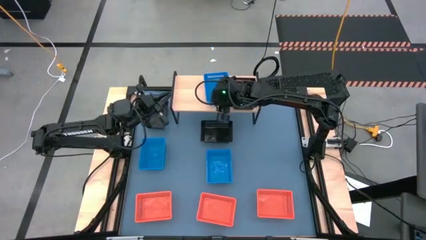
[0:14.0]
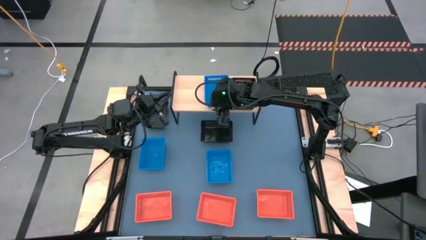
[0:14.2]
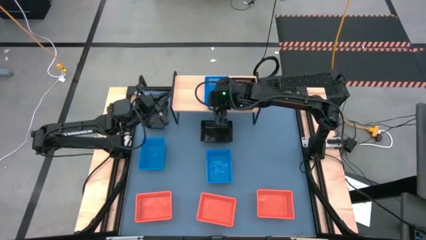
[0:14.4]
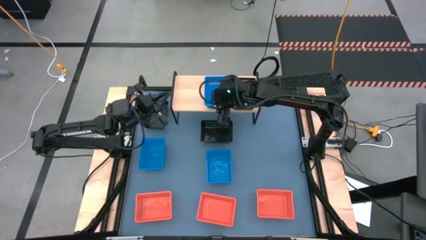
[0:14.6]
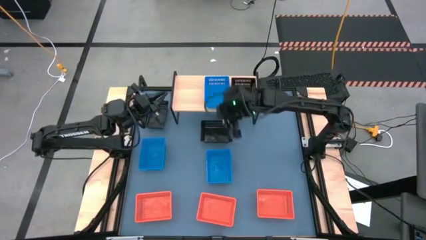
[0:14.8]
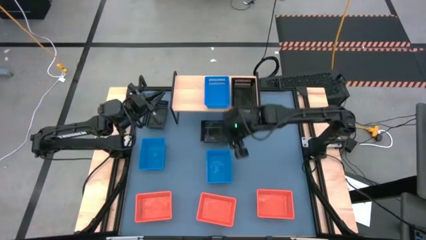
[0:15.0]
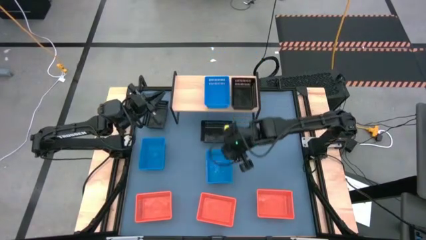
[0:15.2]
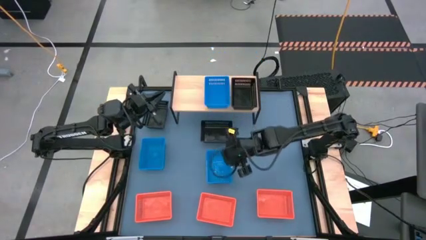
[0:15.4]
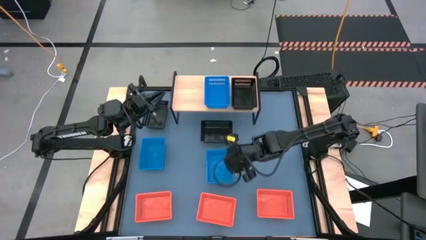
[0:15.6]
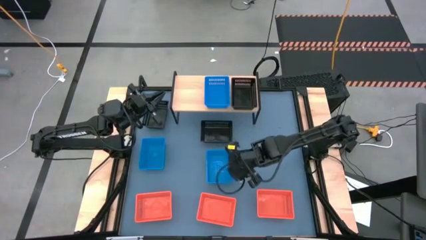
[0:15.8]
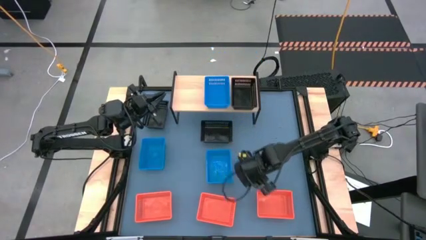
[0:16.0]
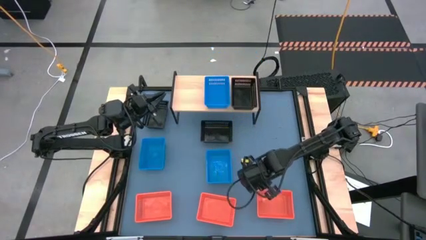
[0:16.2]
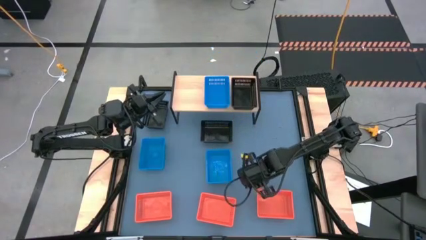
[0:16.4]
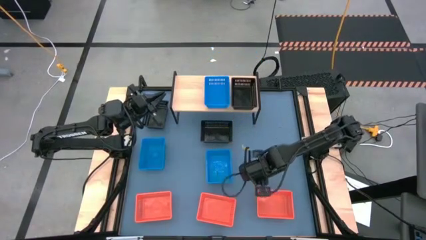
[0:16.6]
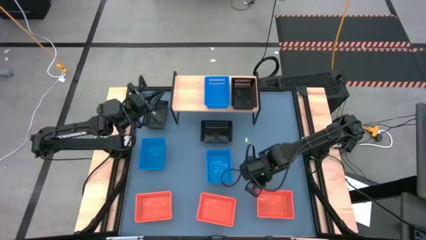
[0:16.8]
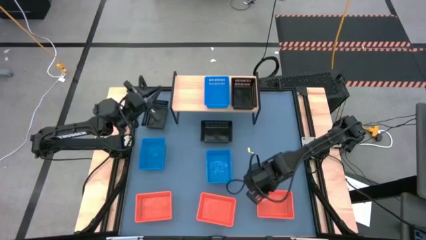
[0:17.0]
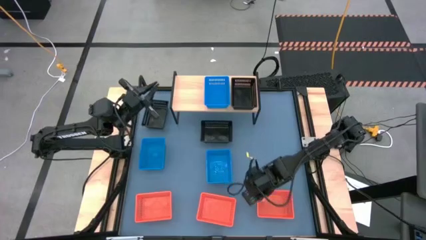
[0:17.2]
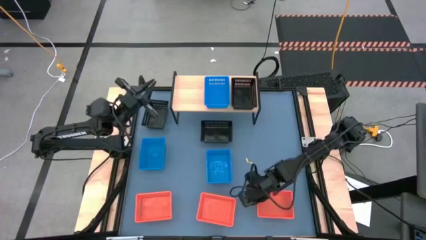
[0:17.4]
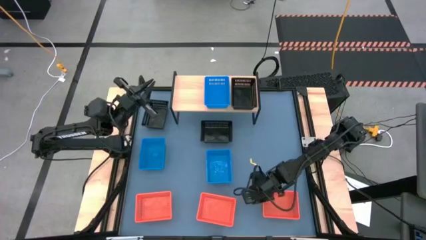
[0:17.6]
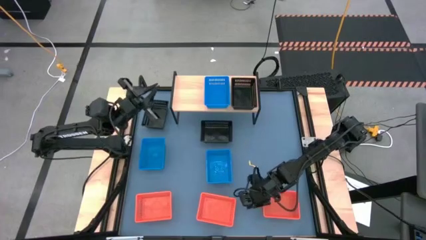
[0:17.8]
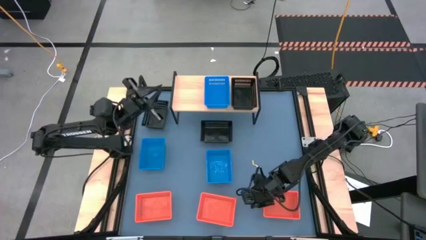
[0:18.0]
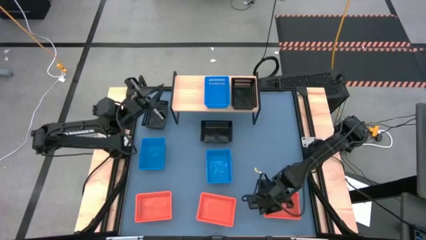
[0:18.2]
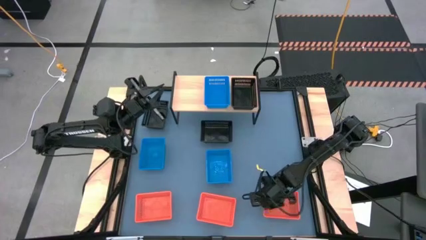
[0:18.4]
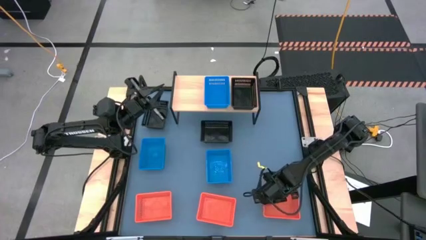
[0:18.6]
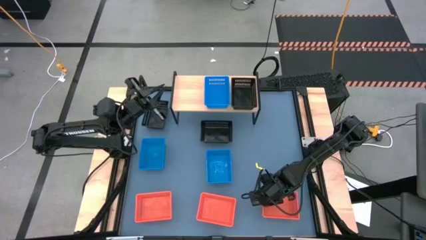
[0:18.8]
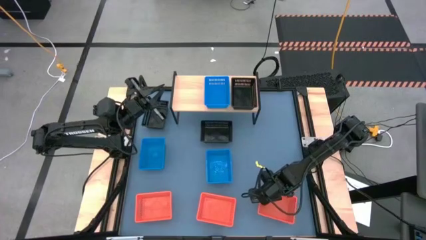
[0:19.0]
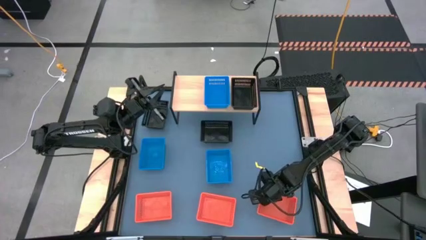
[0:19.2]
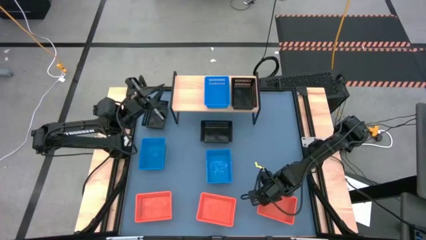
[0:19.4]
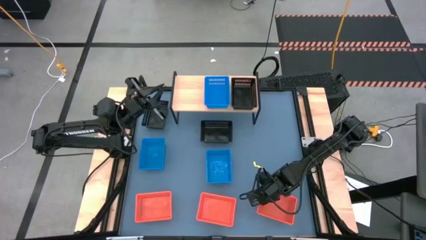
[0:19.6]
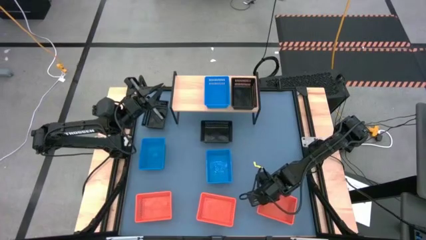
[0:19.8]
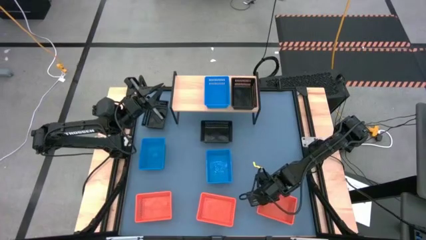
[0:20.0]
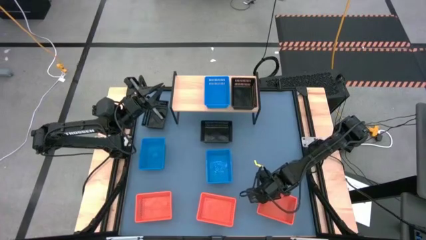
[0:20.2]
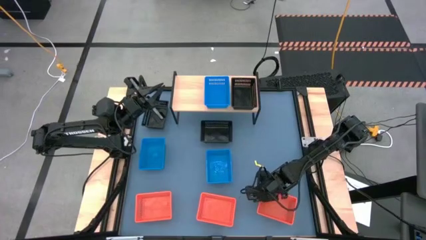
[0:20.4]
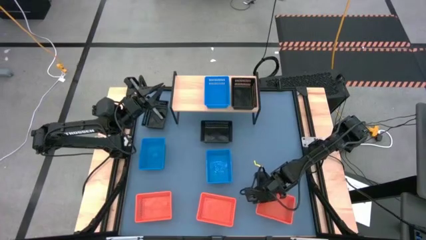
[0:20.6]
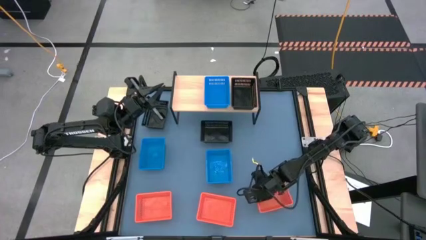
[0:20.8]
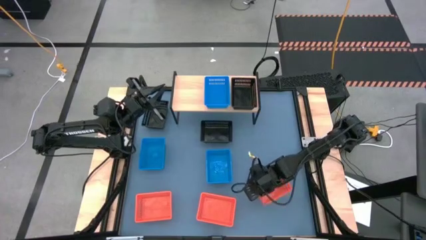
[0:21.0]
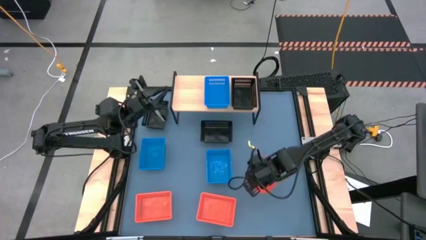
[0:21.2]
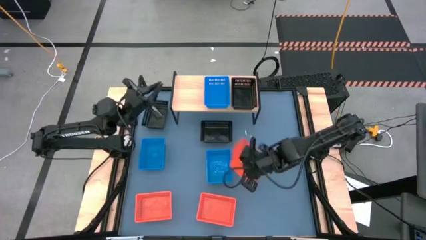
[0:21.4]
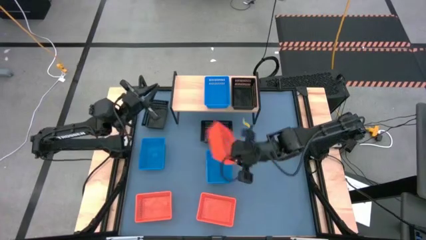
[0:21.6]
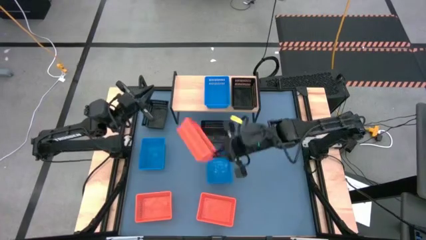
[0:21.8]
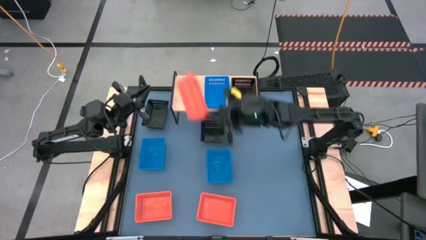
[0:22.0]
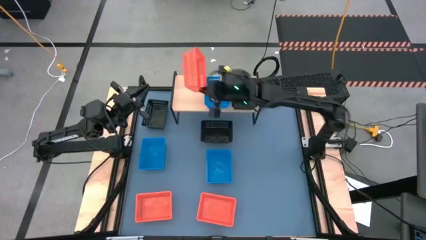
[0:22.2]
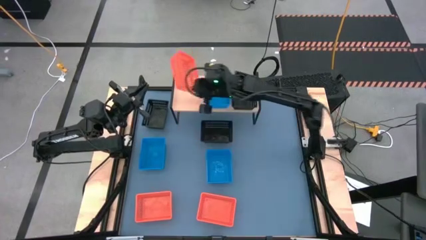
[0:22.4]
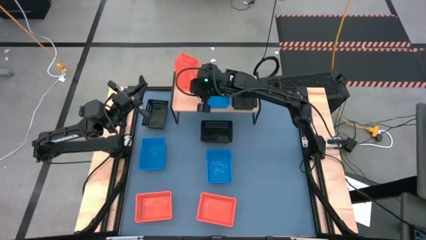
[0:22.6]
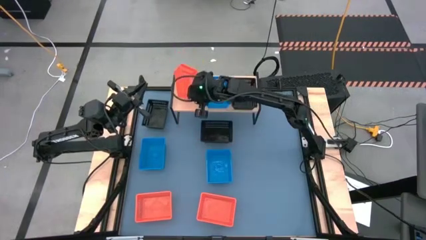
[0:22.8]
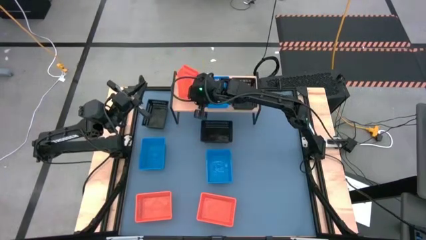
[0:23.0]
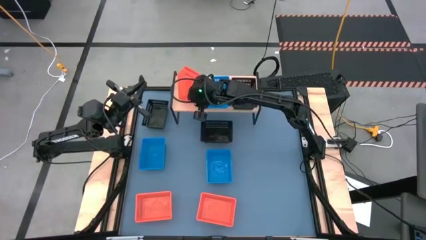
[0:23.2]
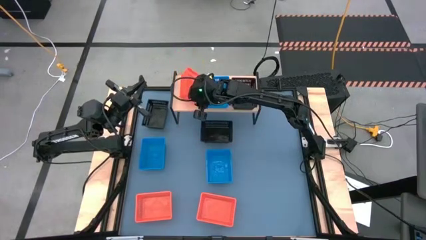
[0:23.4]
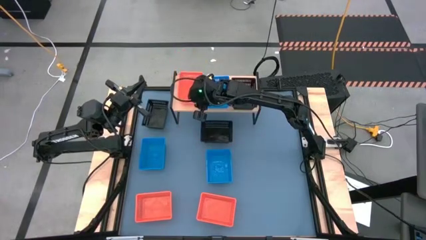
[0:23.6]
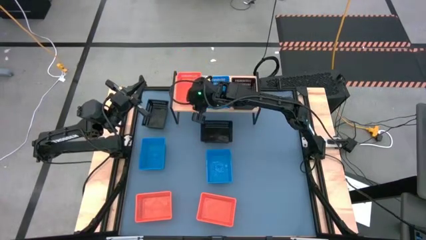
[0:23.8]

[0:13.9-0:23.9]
Task: Stack baskets on shelf by color
Put the right orange basket on the shelf

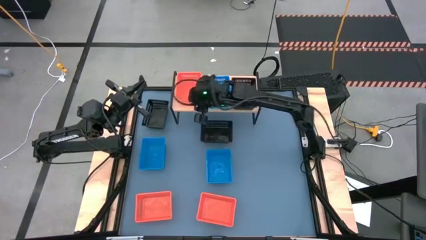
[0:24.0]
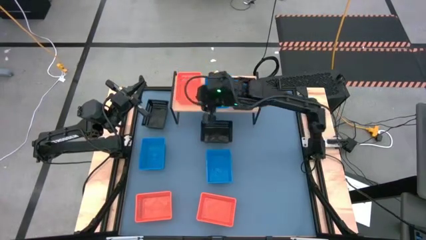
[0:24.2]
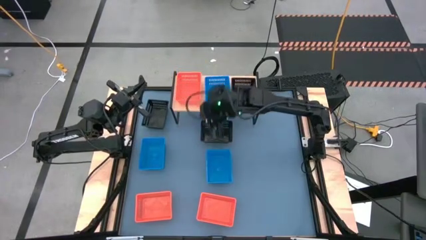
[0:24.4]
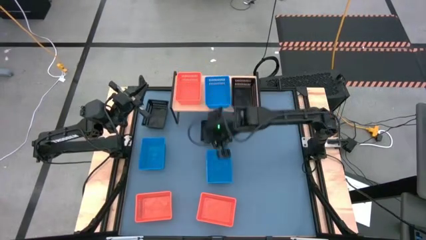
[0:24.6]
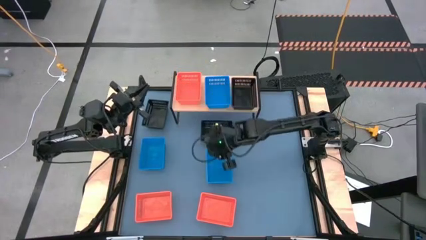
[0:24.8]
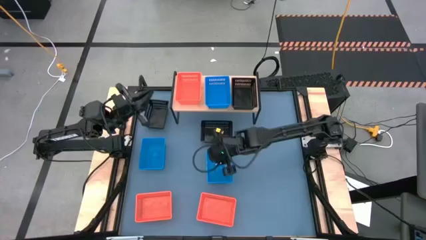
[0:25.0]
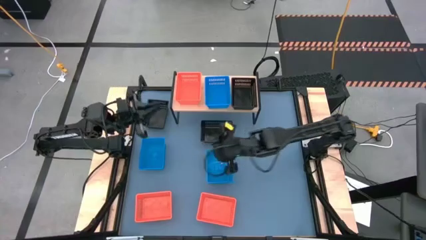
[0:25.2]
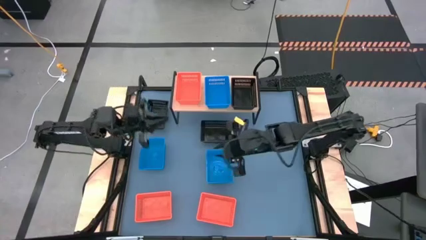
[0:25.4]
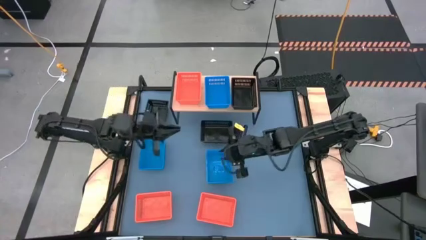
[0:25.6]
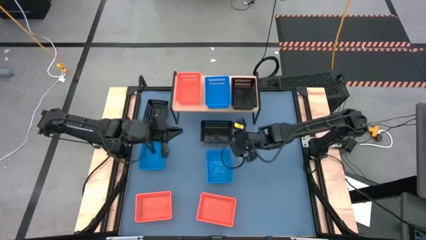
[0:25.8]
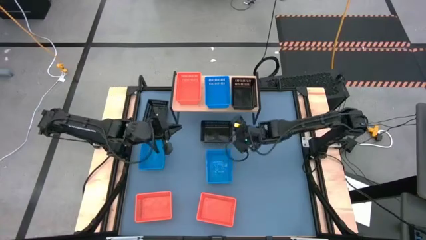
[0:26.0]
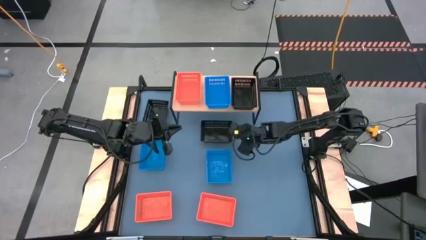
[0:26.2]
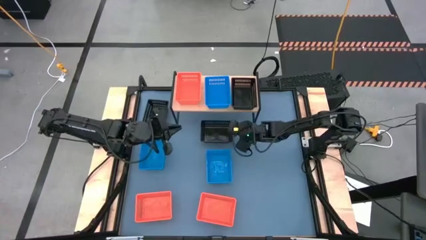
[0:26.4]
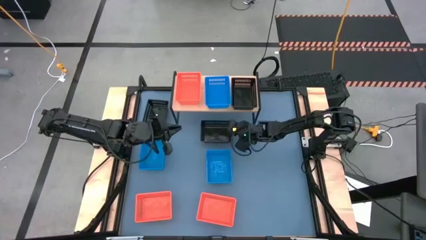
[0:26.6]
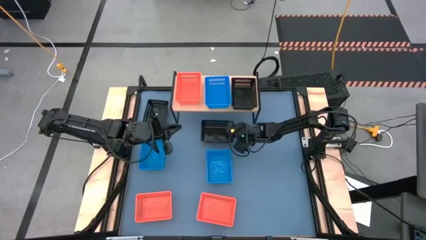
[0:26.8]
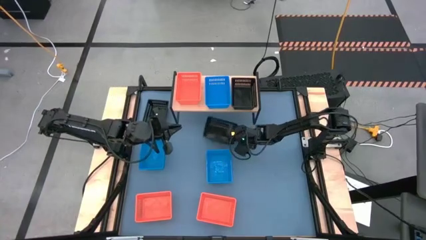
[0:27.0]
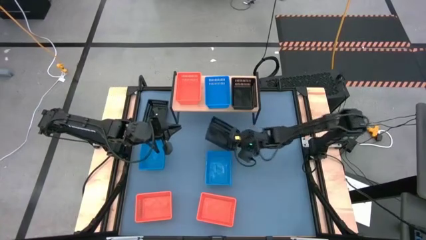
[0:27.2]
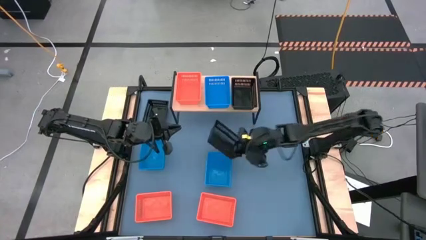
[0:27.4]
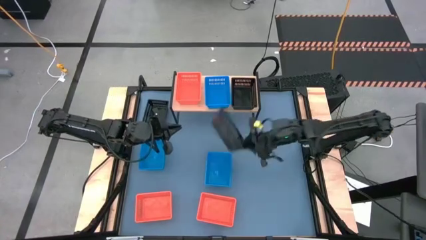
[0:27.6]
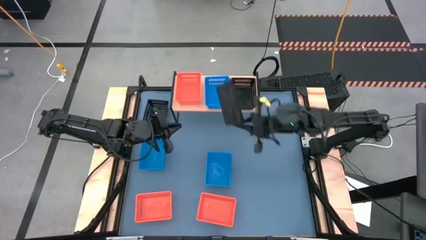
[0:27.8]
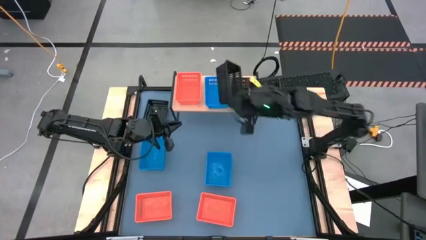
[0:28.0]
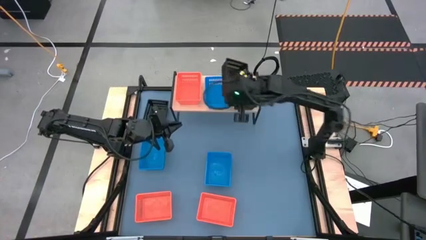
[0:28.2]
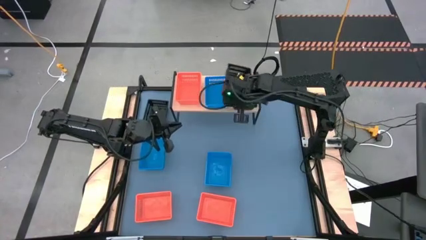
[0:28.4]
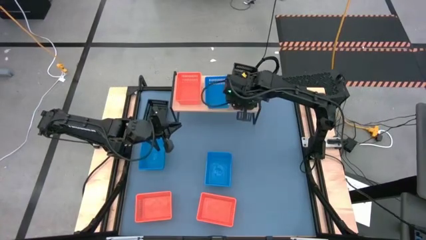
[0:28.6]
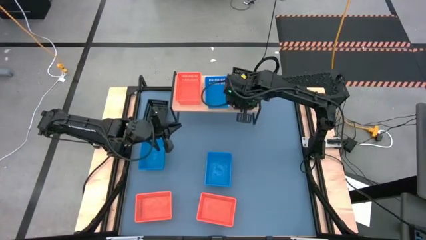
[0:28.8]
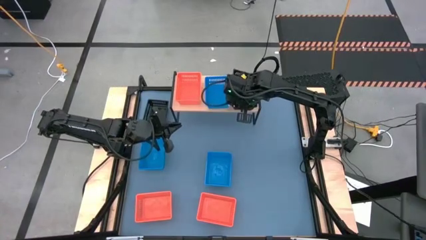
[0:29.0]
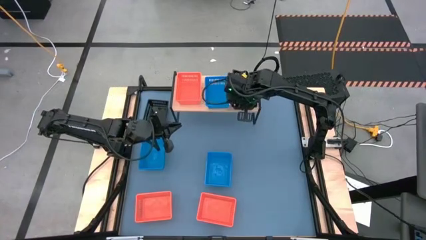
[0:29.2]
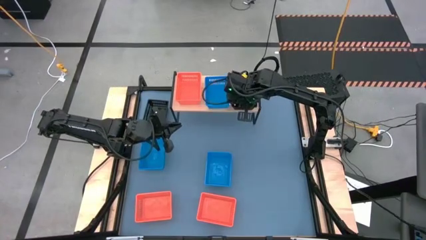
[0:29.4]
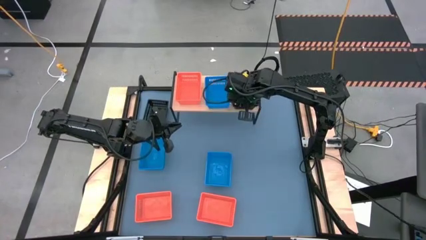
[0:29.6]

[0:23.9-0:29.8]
Stack the bottom black basket on top of the black basket on the shelf
